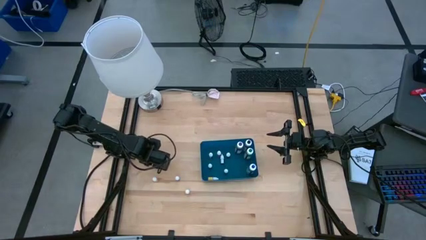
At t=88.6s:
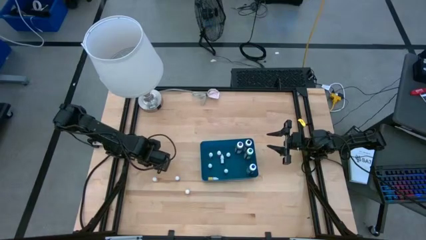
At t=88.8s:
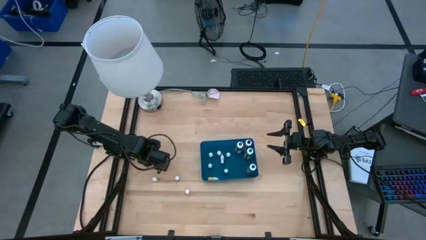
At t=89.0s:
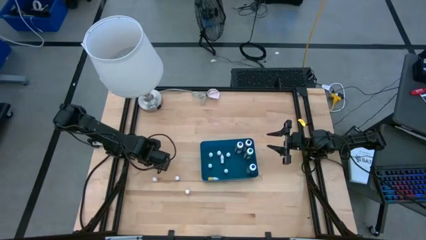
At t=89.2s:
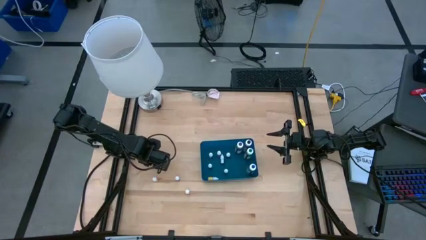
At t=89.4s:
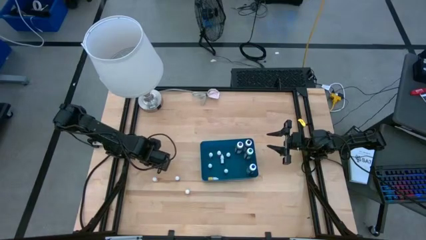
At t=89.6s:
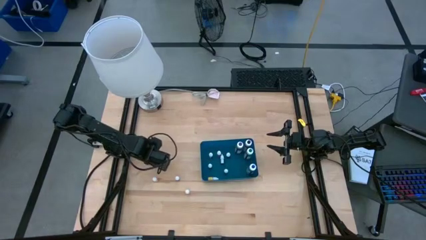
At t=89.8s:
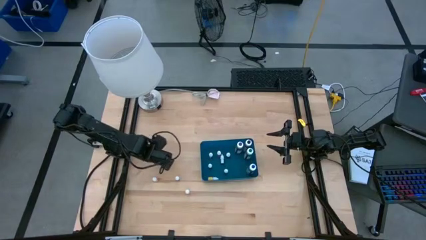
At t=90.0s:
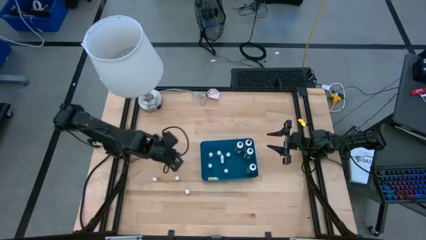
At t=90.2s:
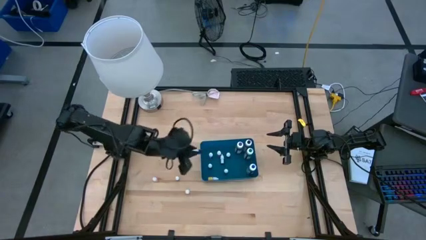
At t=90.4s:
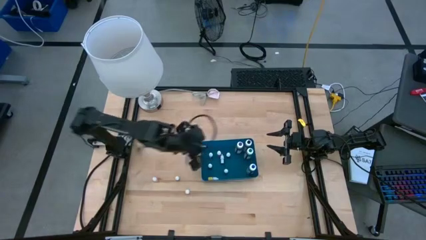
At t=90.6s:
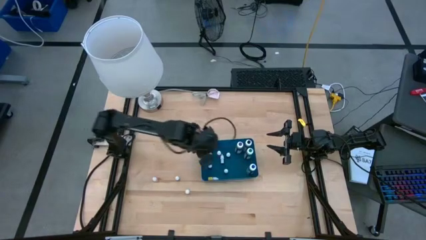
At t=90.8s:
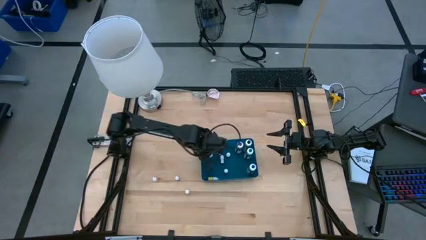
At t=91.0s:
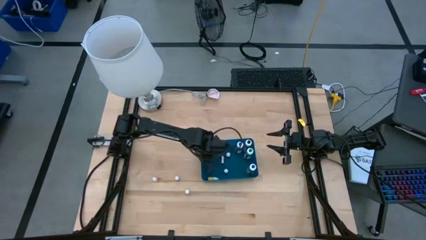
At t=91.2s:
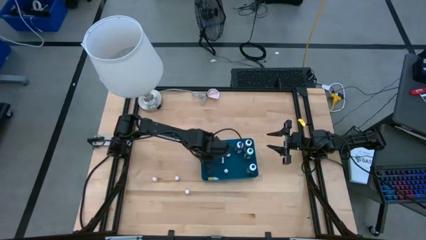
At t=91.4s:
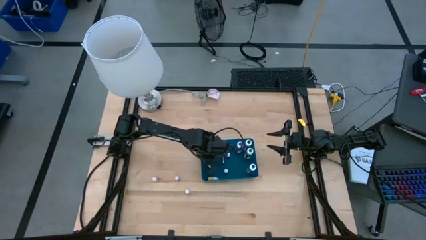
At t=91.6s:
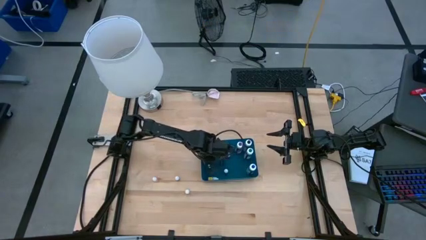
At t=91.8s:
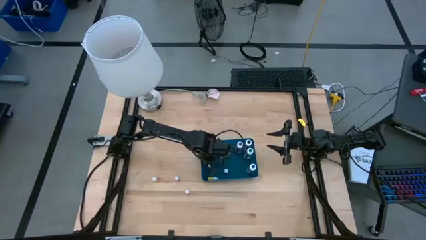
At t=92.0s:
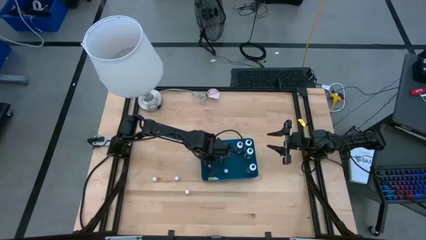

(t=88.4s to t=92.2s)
Task: Pick & Place food coloring
Put the small blue food coloring bottle into the blue bin

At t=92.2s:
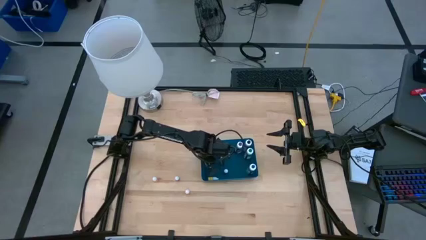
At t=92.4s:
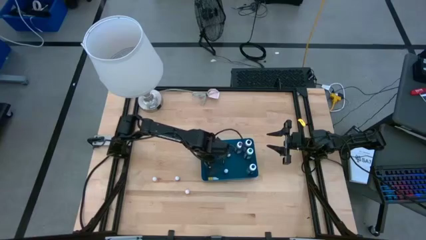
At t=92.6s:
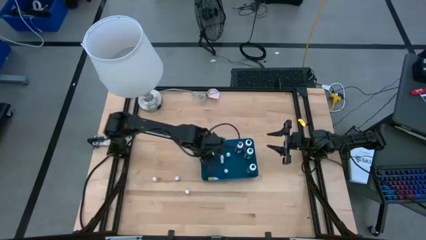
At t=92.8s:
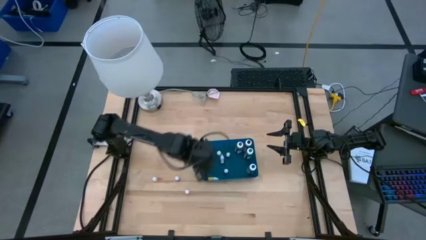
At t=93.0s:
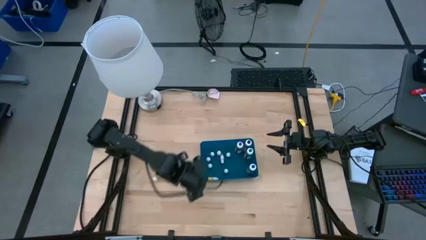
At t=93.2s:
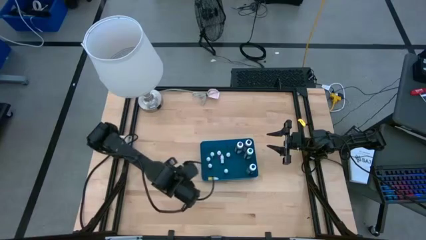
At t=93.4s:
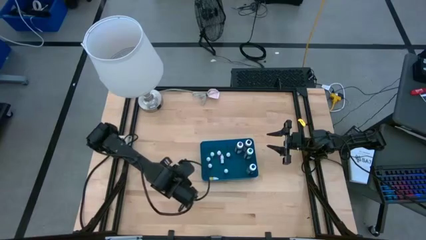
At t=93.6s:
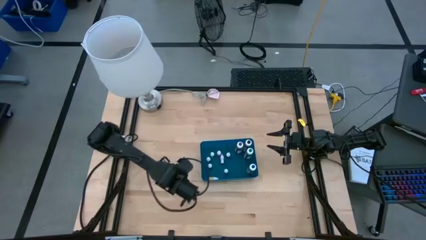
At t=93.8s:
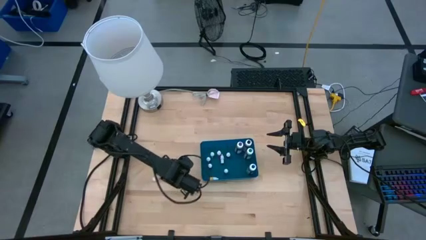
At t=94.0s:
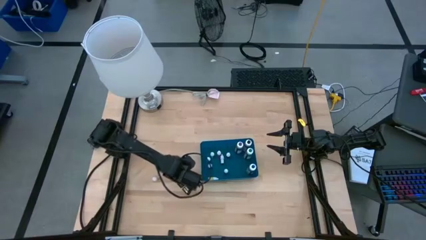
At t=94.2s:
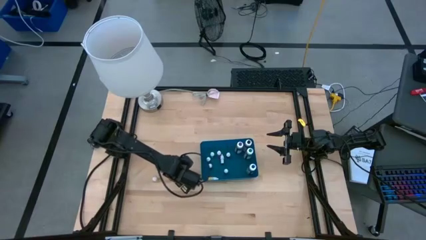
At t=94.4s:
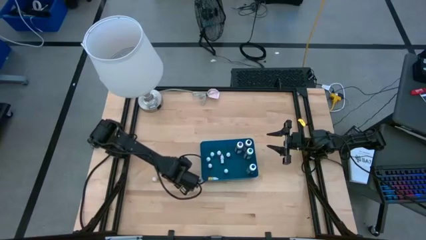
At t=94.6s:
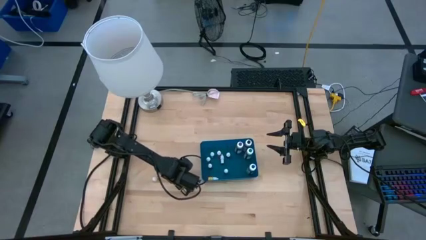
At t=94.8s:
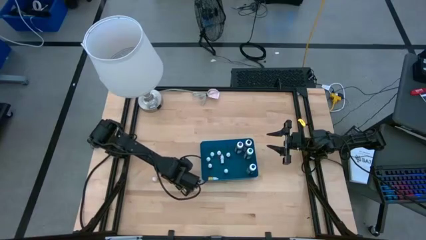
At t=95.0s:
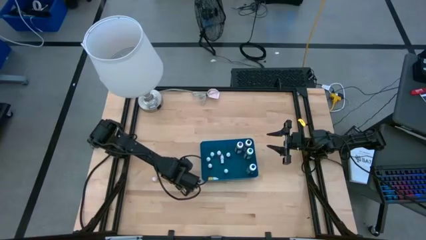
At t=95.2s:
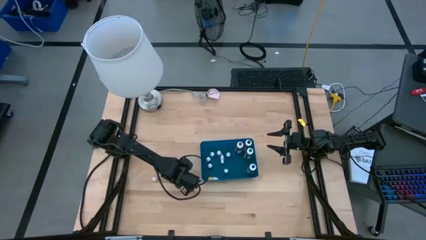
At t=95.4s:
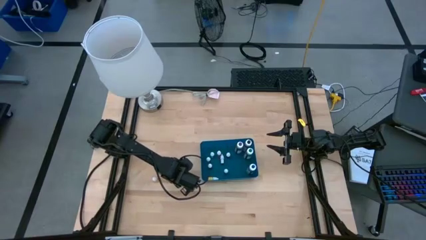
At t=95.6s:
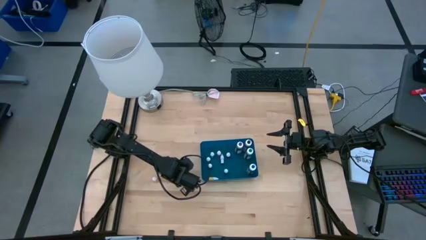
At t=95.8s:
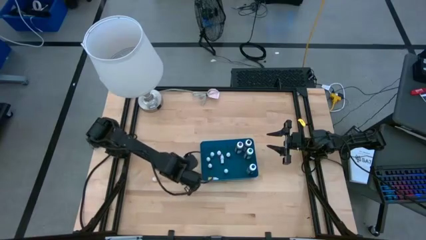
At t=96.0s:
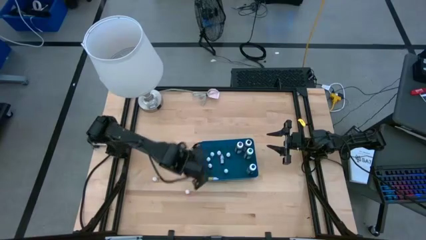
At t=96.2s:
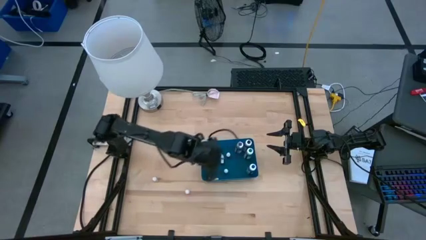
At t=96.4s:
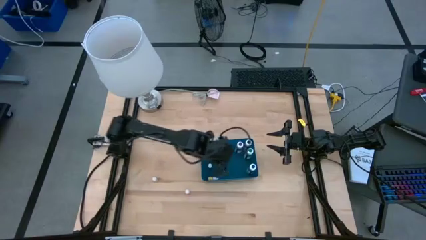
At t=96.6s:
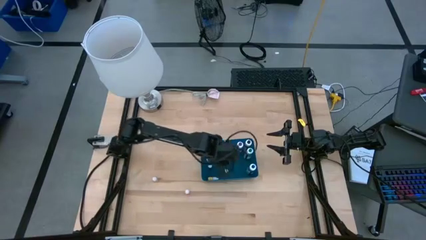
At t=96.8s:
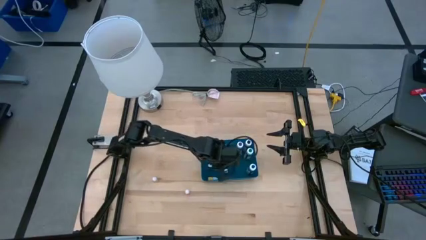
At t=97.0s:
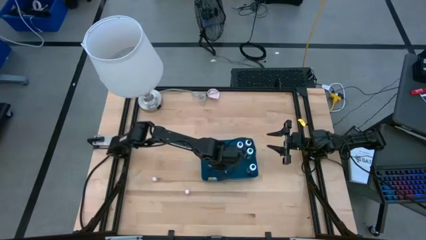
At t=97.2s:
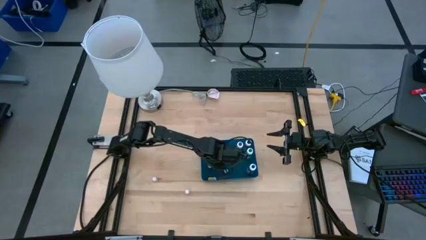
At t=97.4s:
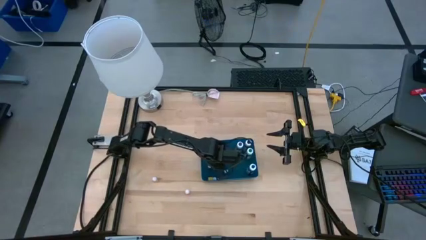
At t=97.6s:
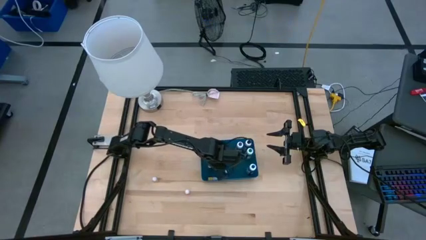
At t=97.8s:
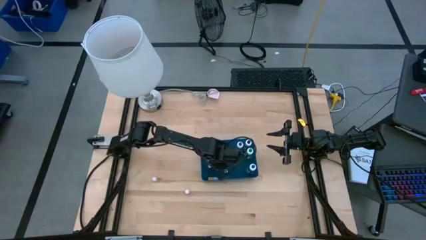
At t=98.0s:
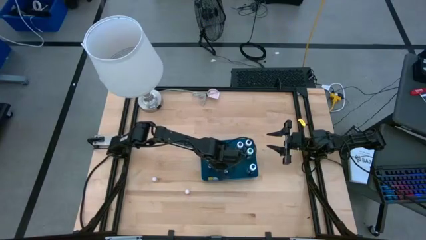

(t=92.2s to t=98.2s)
Put the small green food coloring bottle into the blue bin

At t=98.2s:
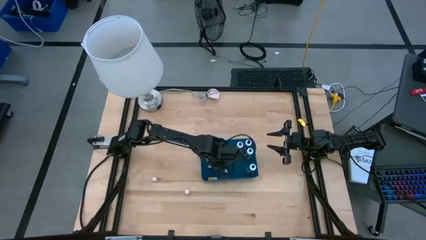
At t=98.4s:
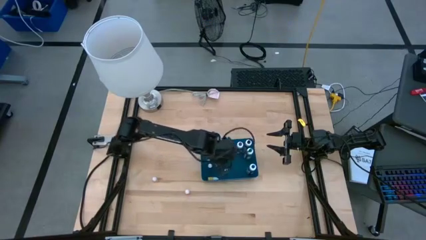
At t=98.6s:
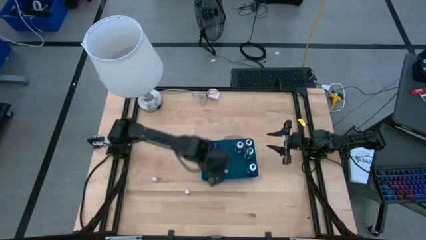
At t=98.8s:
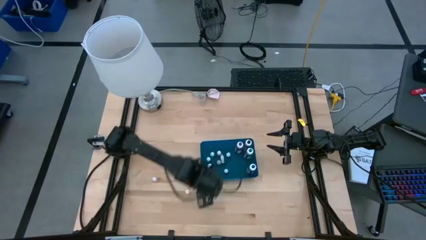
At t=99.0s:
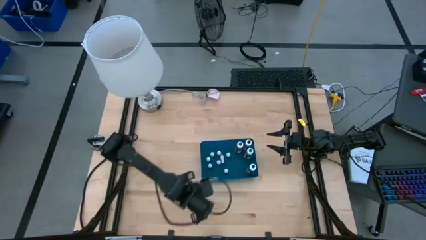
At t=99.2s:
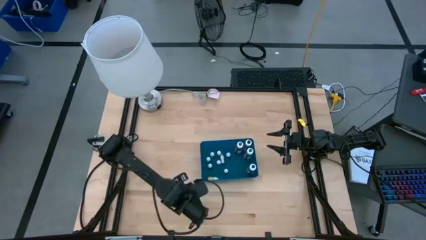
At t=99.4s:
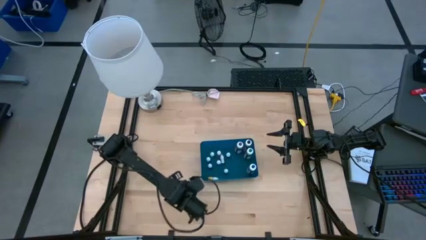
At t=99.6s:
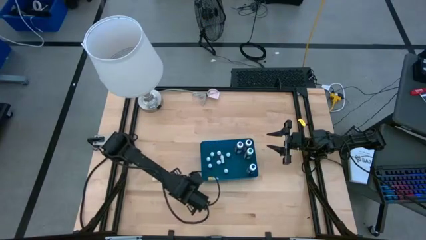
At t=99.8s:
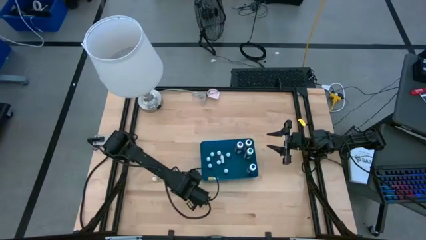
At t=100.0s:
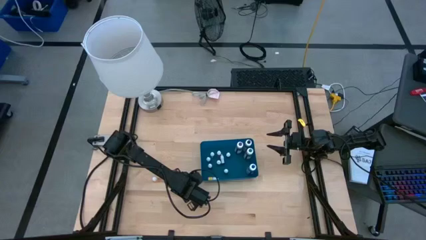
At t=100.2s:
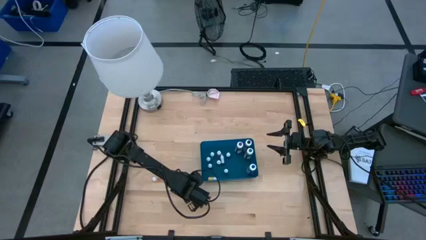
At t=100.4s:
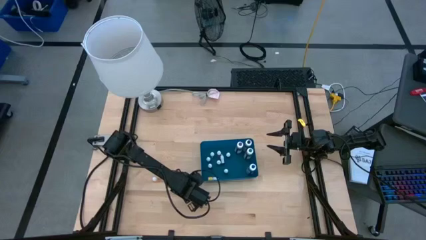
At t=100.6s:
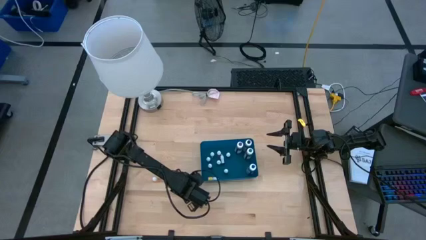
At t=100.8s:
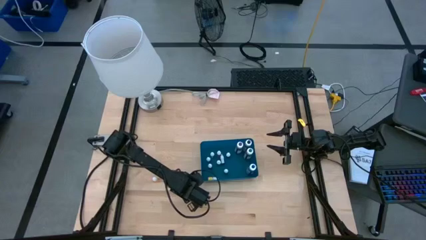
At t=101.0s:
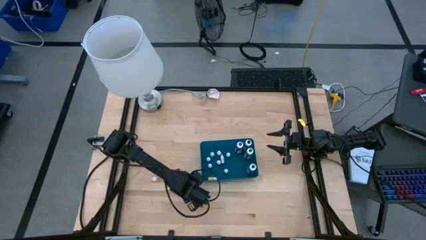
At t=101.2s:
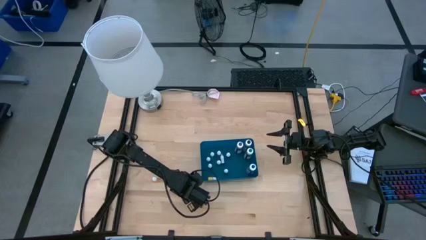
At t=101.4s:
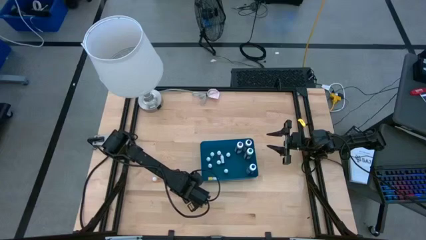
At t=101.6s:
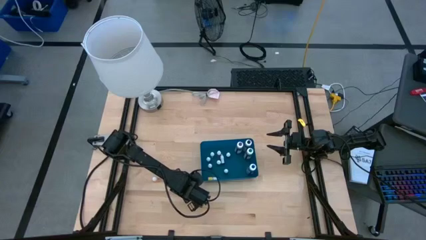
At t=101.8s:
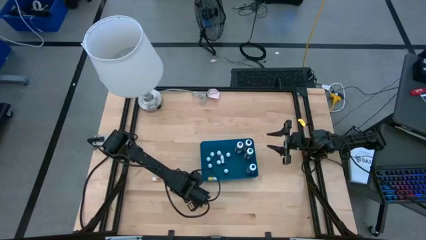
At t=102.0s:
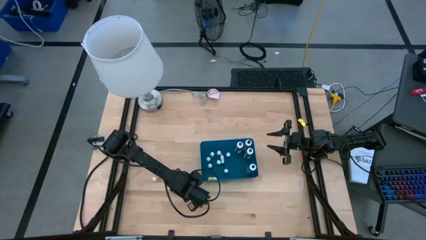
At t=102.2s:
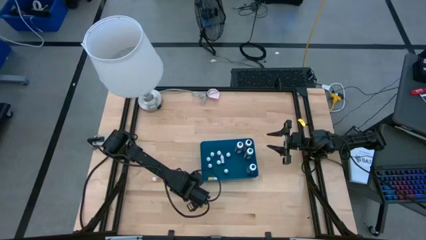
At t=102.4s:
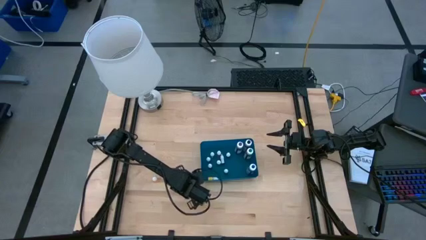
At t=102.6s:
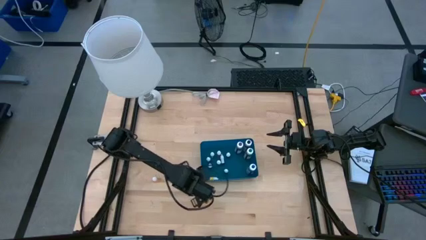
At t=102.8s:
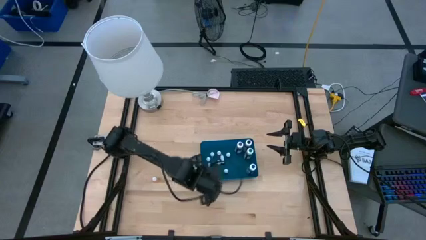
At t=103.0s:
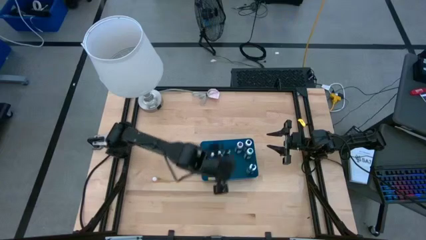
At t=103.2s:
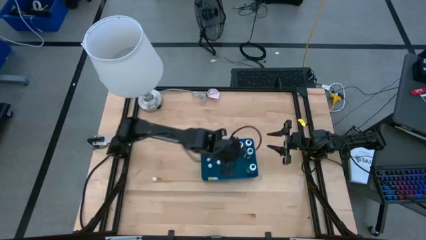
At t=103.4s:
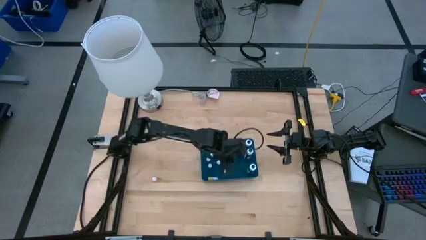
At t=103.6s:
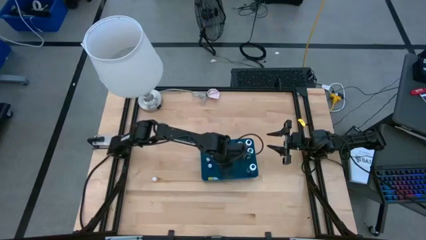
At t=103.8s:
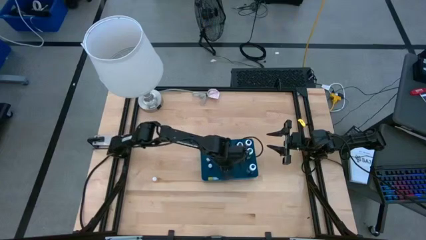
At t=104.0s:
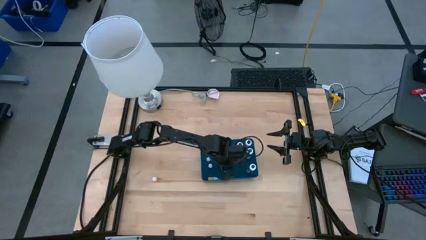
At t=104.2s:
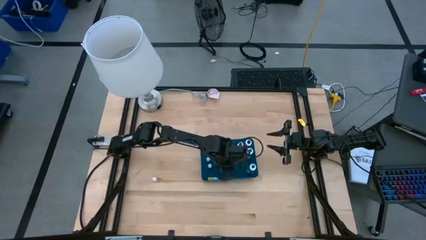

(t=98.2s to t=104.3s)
Put the small orange food coloring bottle into the blue bin
